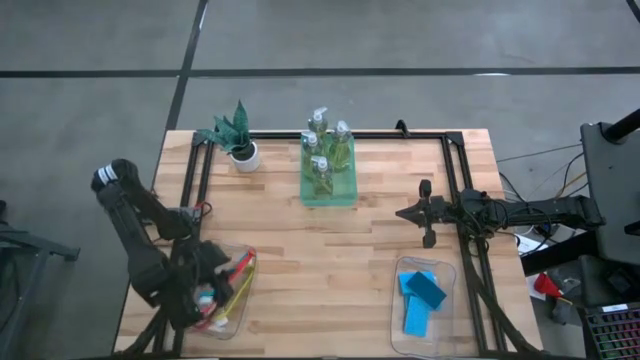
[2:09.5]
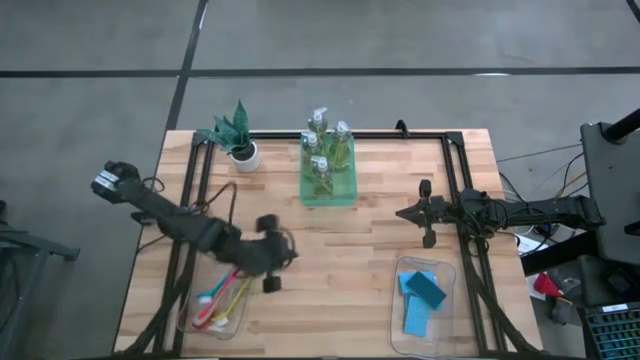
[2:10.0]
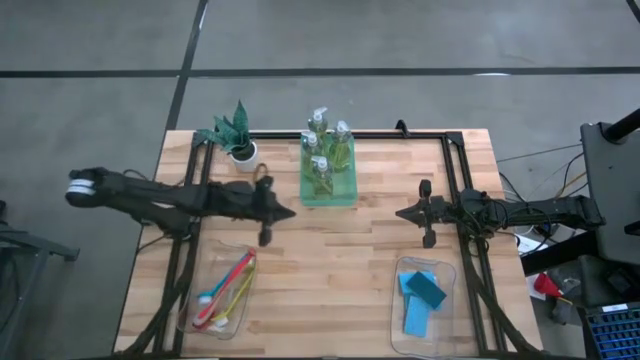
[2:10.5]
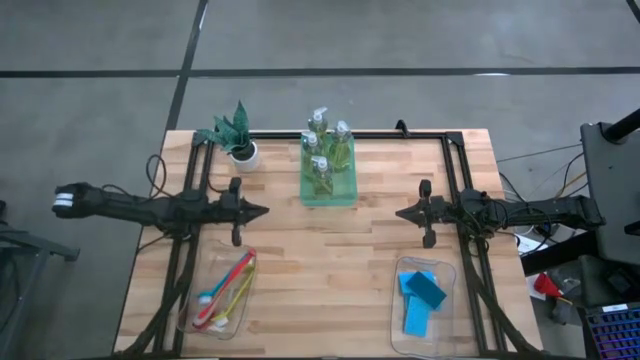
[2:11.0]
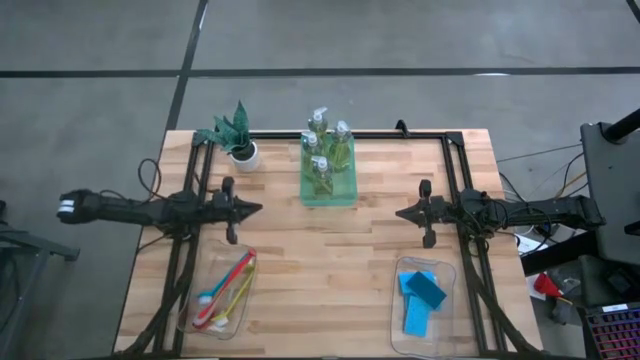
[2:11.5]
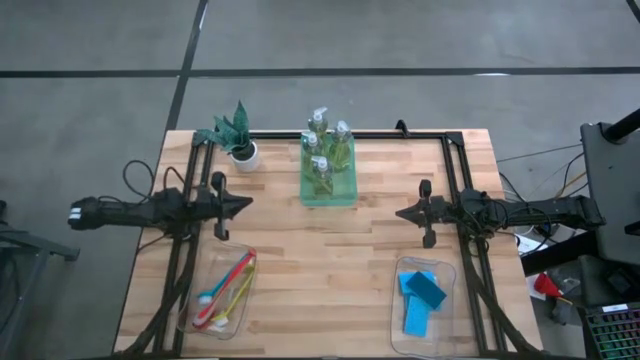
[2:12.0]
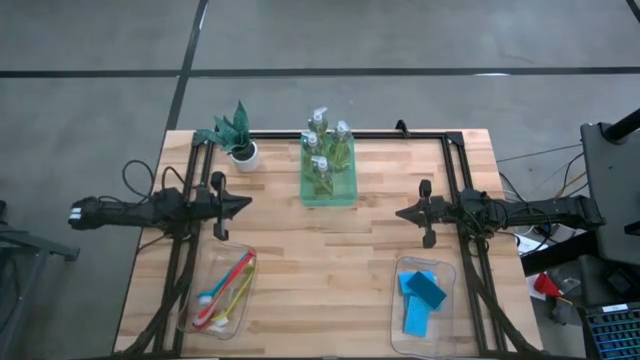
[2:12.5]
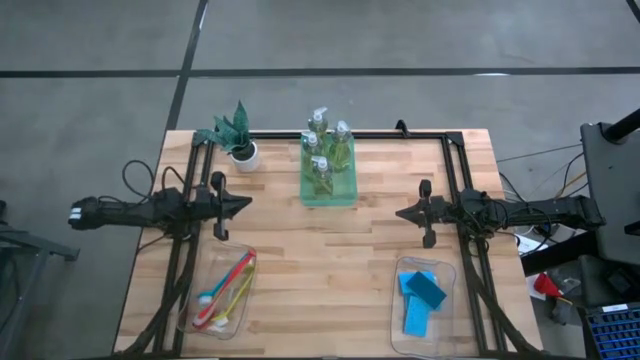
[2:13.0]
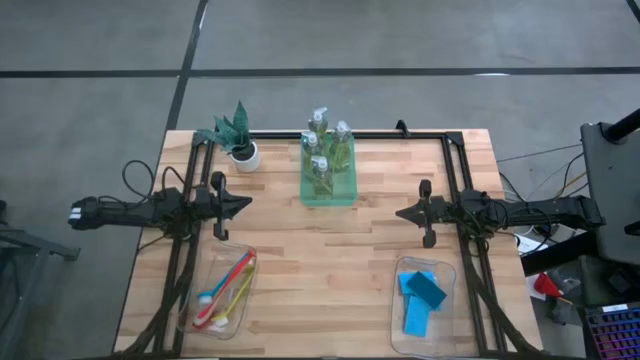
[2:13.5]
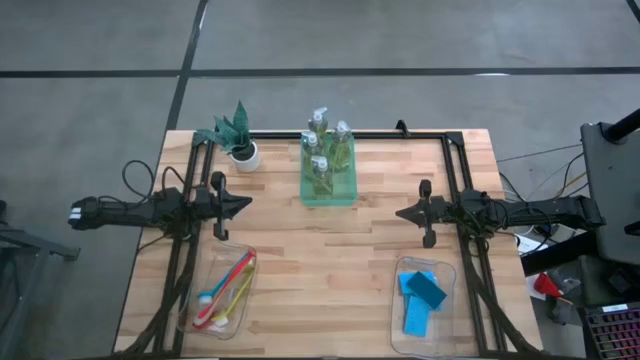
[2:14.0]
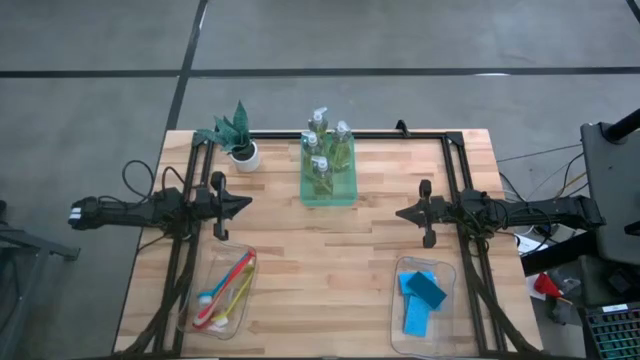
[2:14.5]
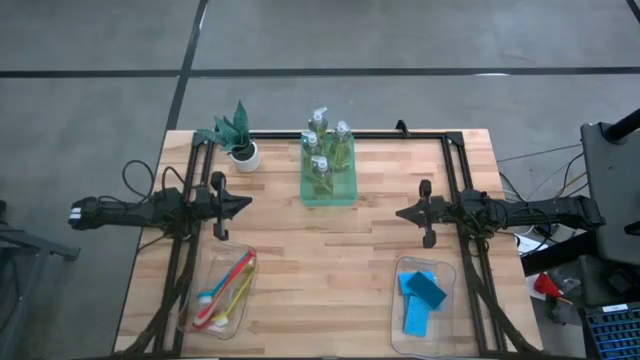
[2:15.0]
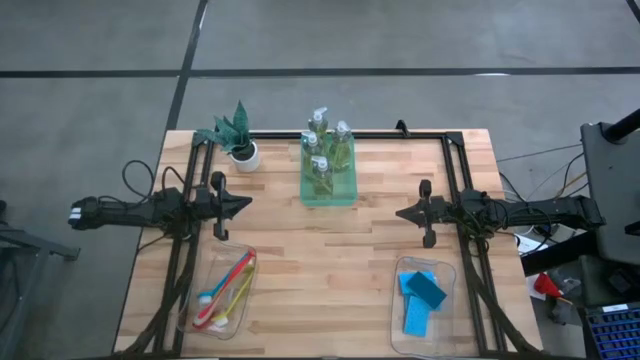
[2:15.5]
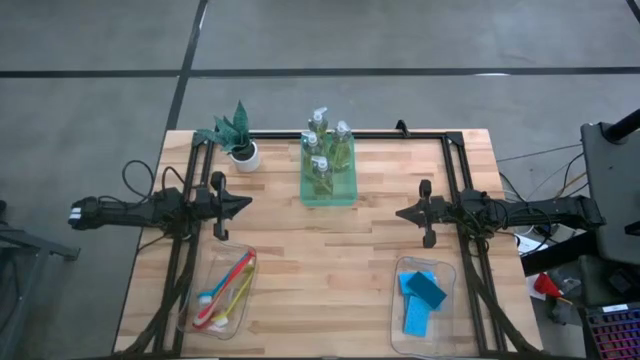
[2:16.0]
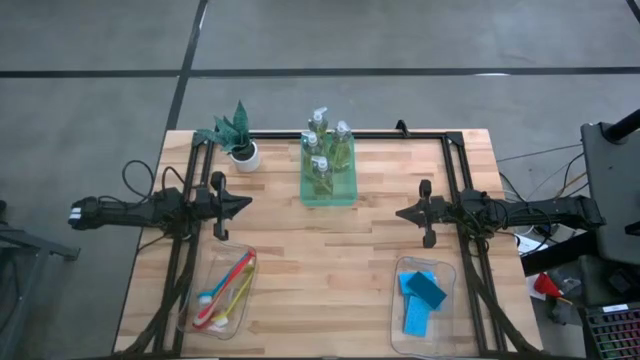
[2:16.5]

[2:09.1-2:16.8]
Task: Pick & Place Kitchen Sink Supplies
Return to Home Position

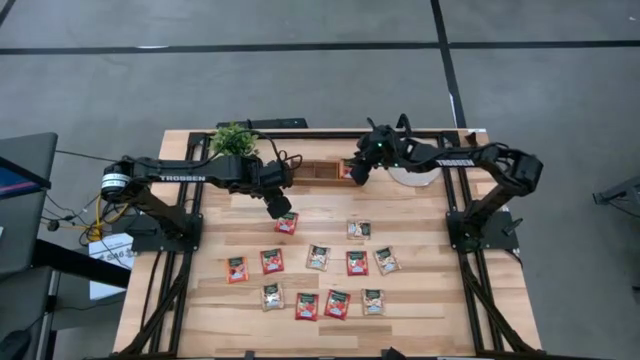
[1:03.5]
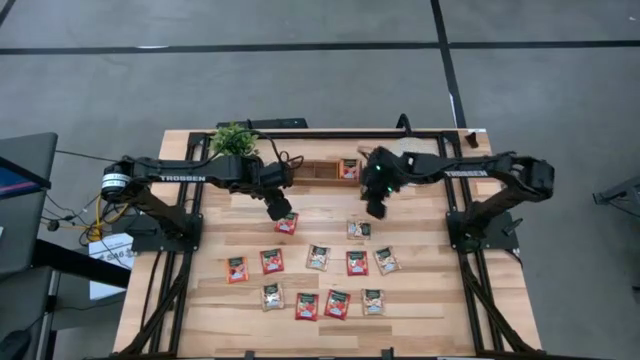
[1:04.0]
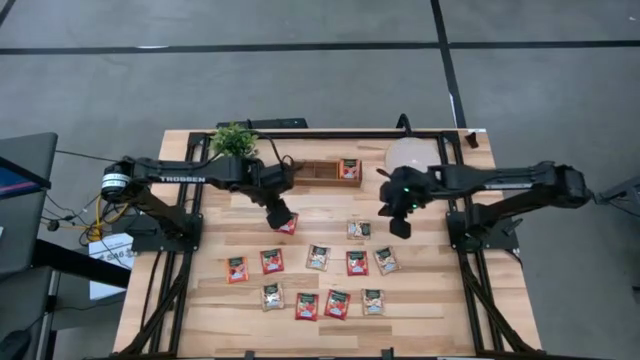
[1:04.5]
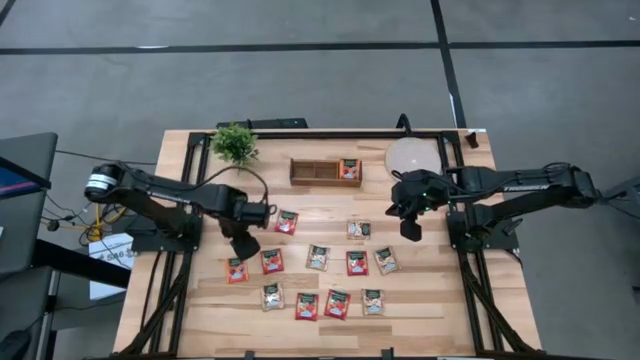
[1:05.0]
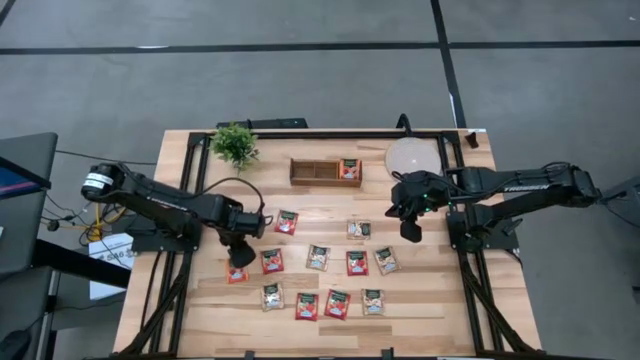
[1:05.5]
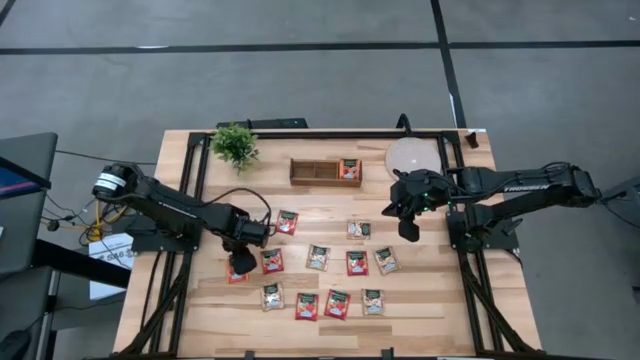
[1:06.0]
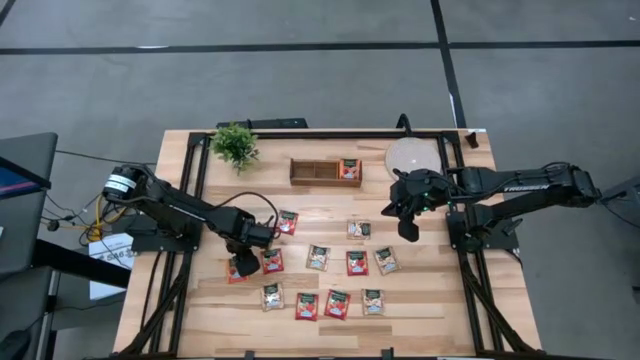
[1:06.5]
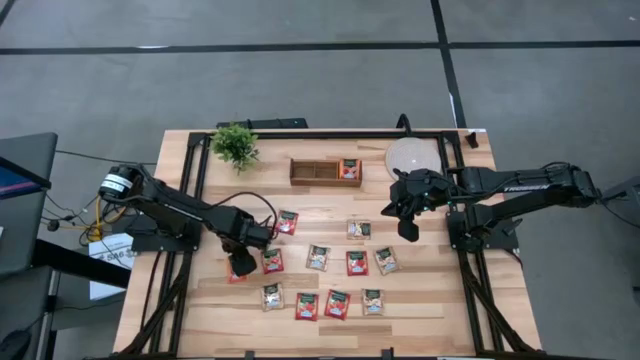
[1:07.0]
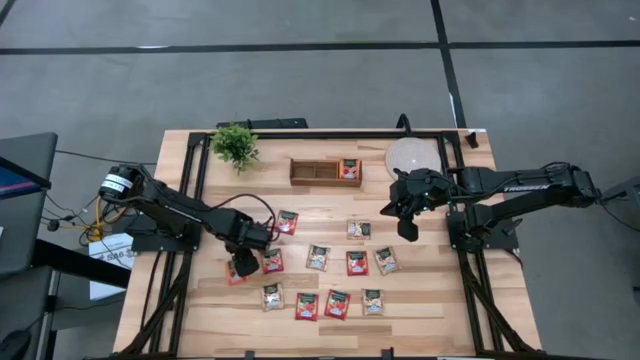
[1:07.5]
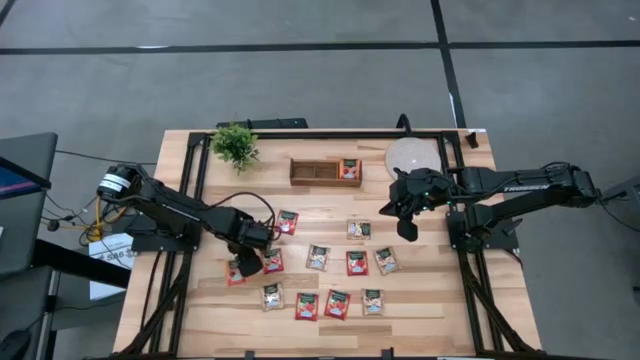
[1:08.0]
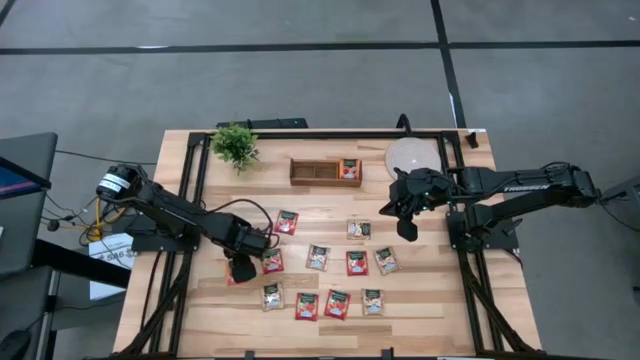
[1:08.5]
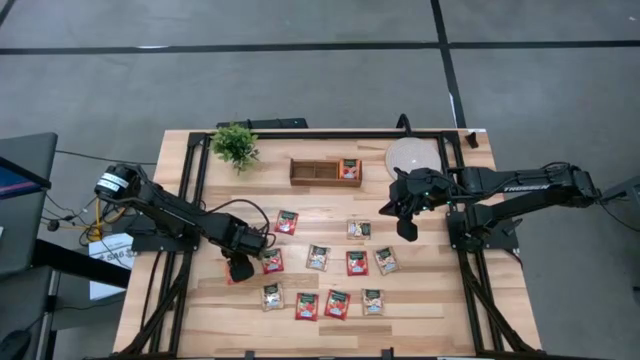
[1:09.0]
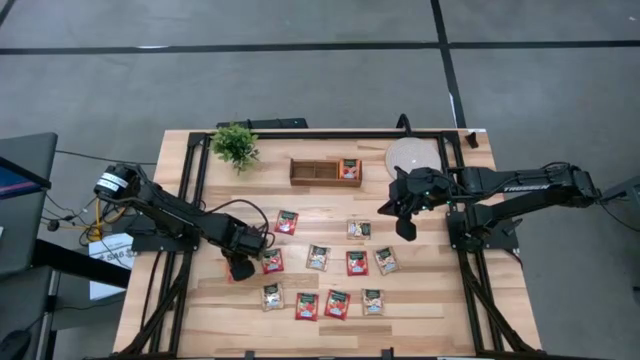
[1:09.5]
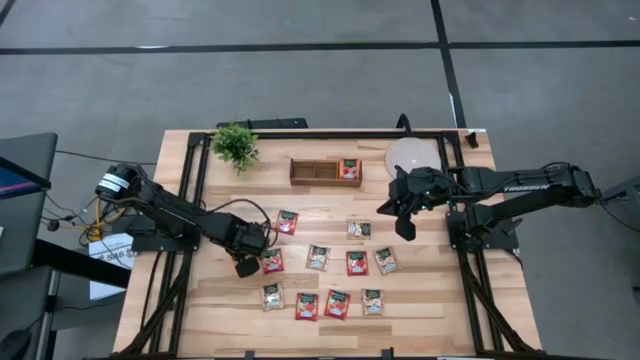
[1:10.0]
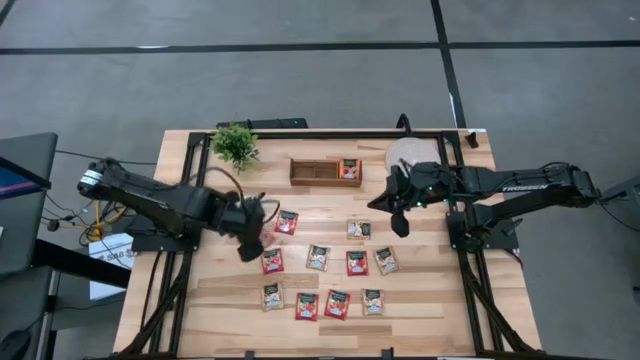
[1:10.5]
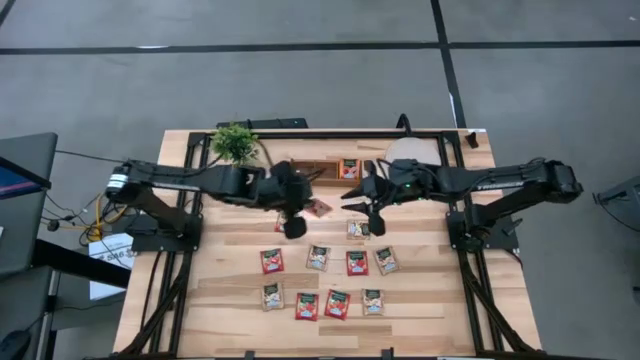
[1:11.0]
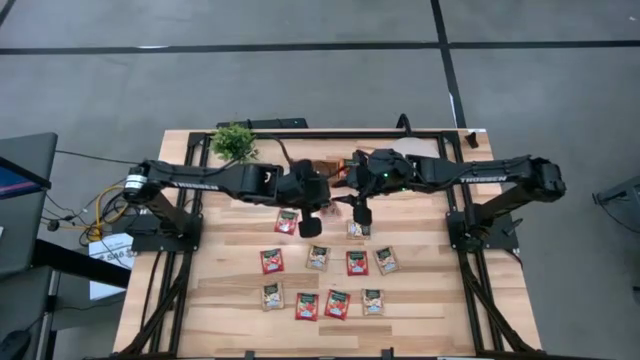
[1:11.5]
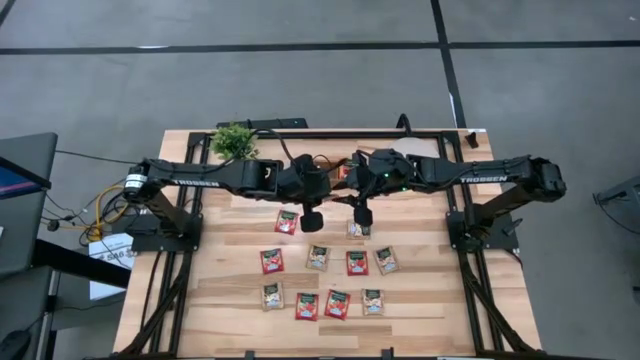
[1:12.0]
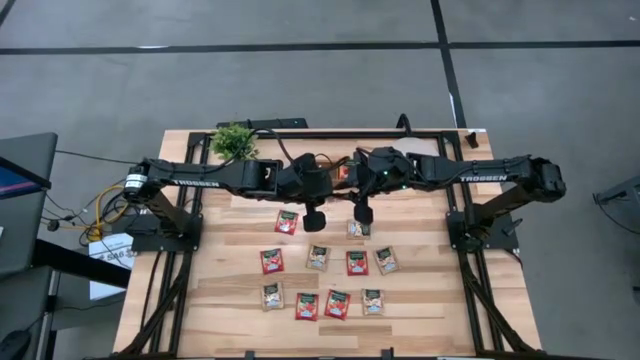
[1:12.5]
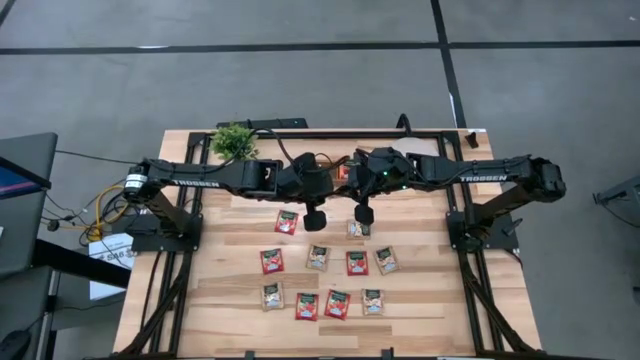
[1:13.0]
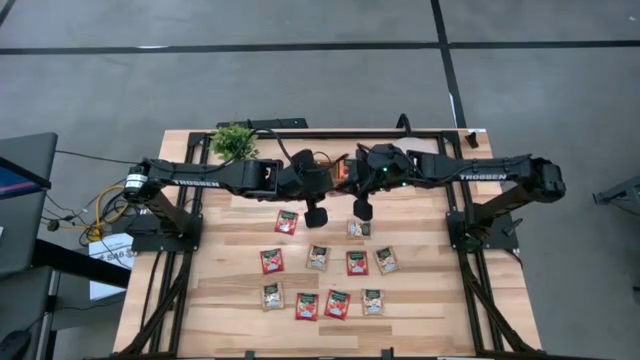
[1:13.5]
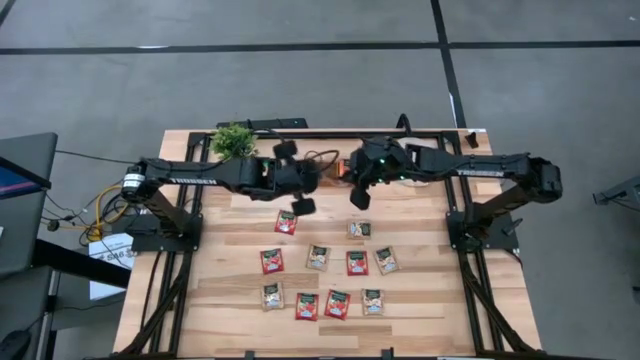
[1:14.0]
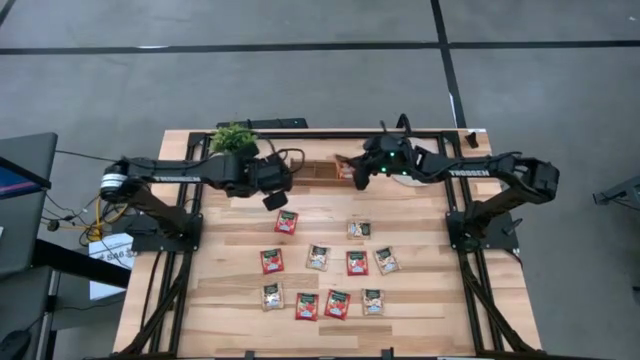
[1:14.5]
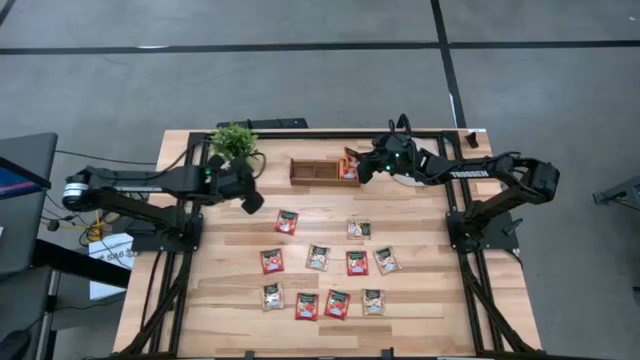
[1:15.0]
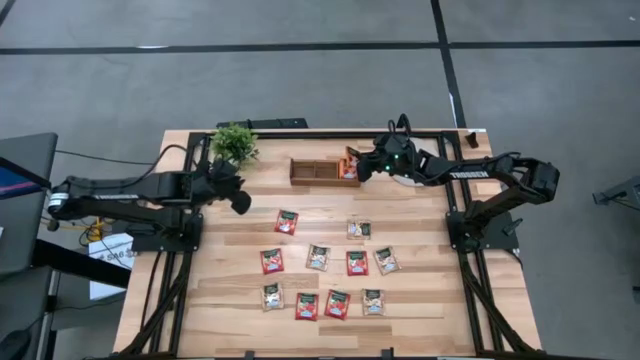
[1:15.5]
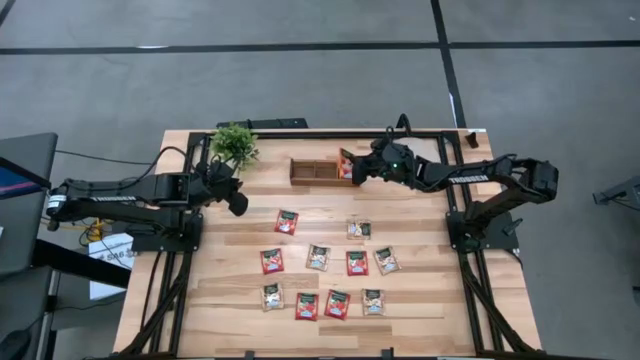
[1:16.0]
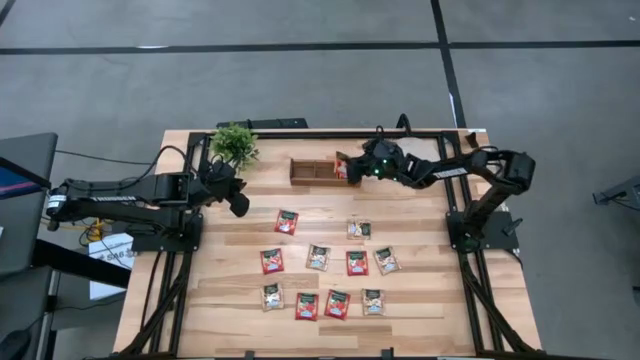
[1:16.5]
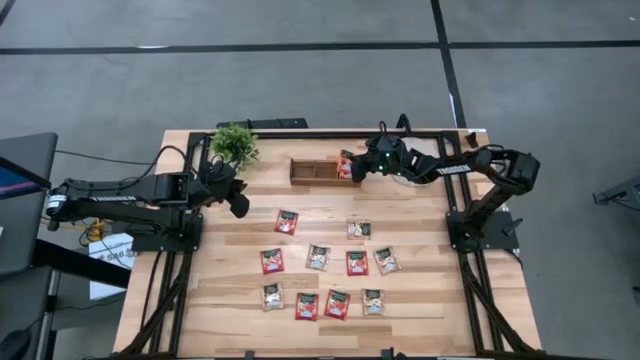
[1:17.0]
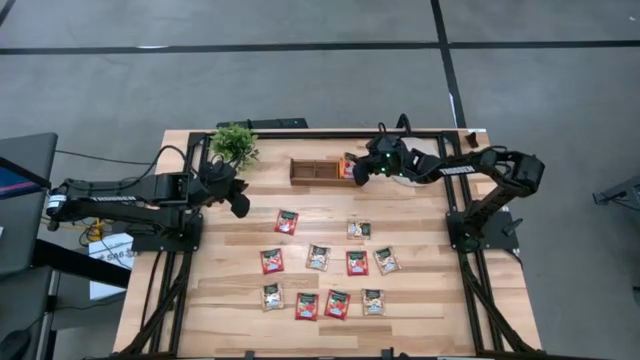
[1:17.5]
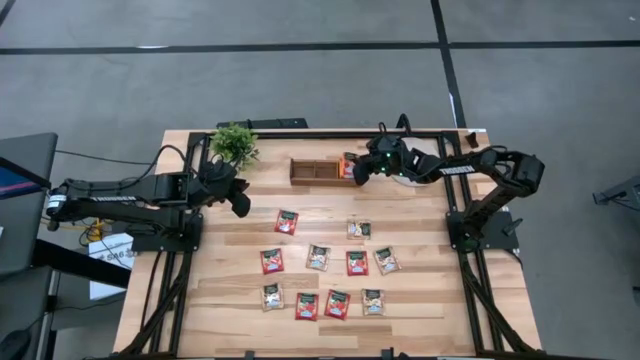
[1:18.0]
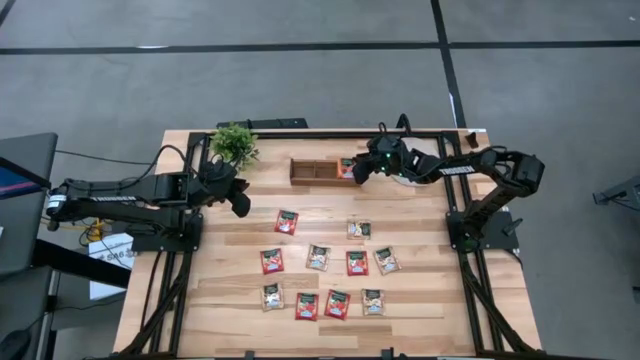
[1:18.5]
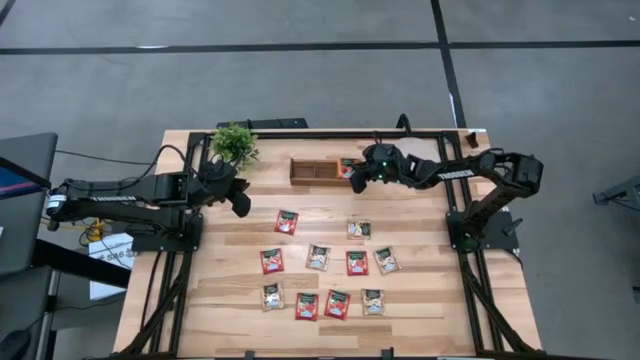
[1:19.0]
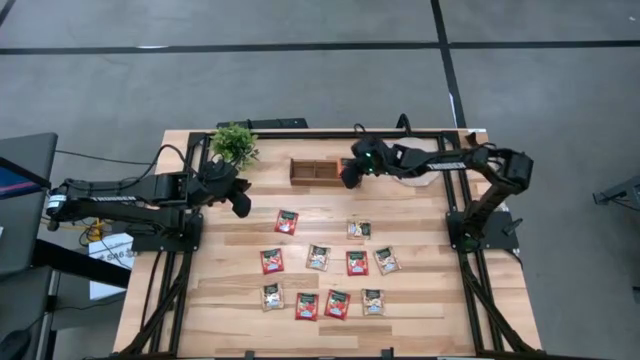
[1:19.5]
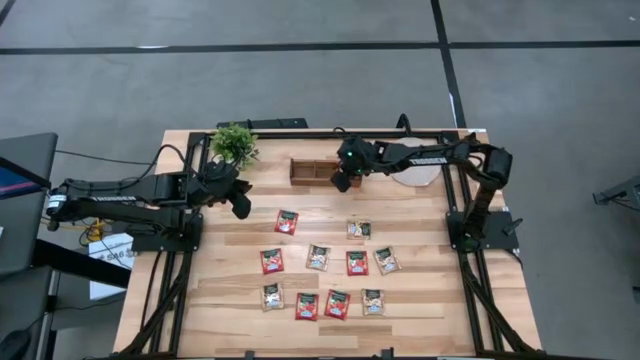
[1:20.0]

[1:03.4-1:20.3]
Task: Pick & Place Tea
Put the orange tea bag into the right section of the wooden organizer
